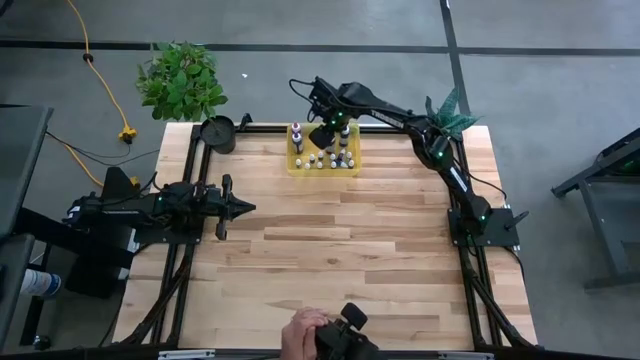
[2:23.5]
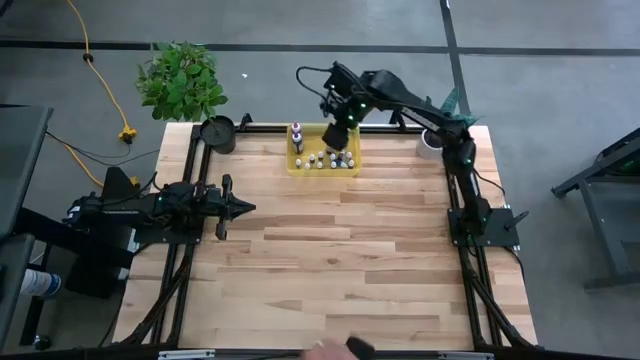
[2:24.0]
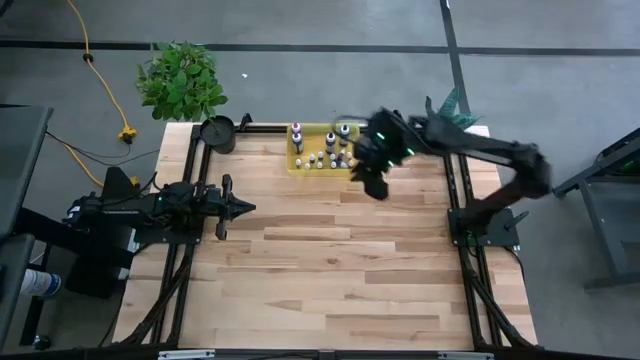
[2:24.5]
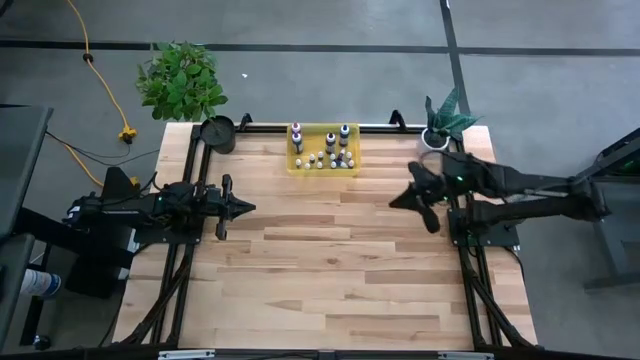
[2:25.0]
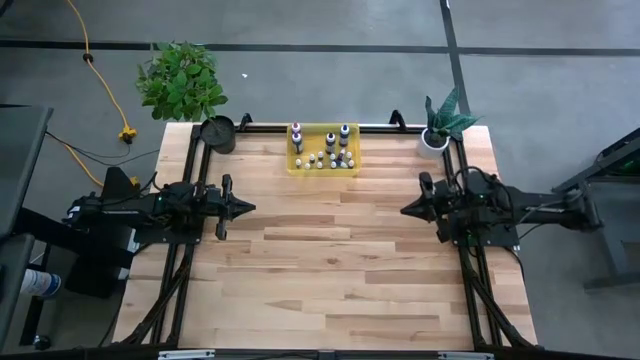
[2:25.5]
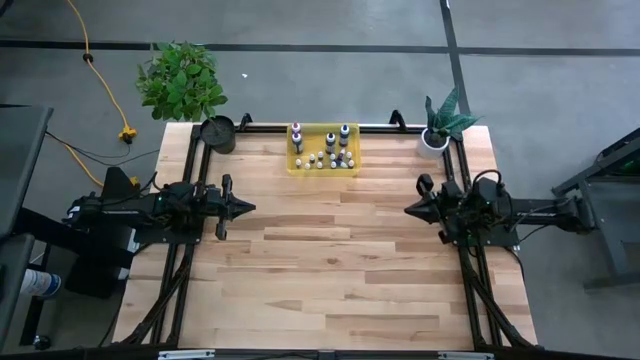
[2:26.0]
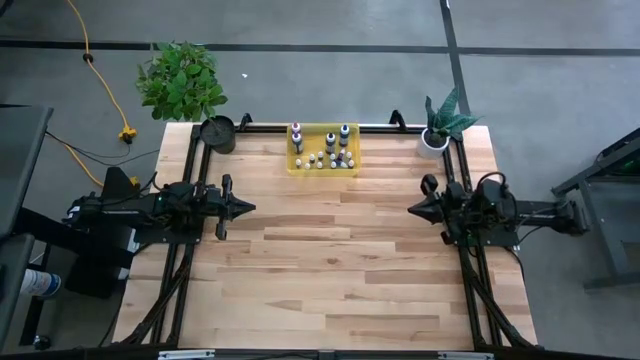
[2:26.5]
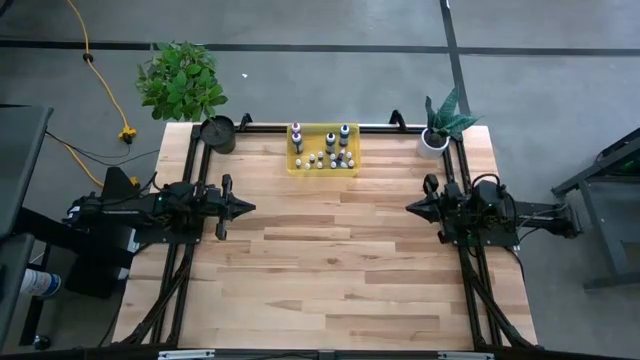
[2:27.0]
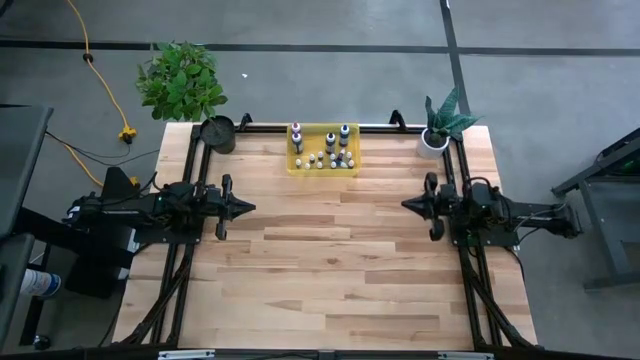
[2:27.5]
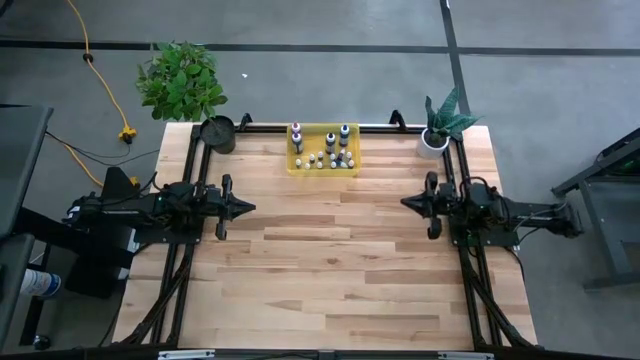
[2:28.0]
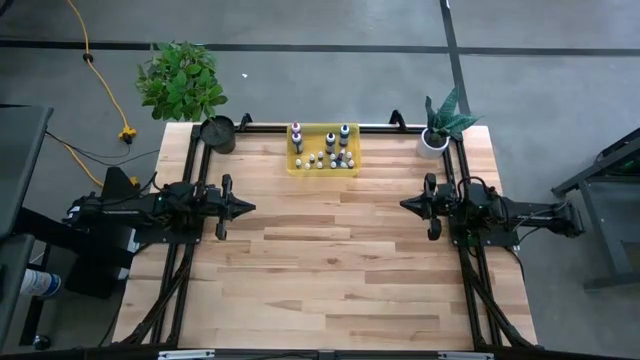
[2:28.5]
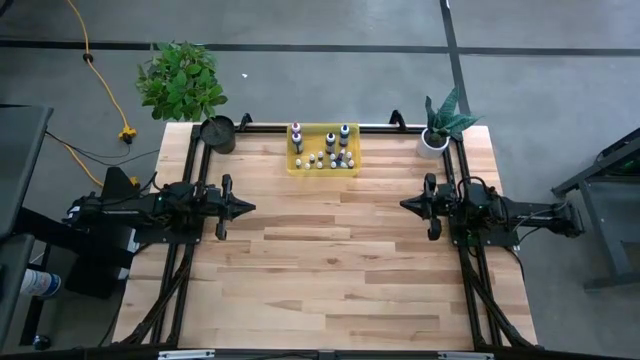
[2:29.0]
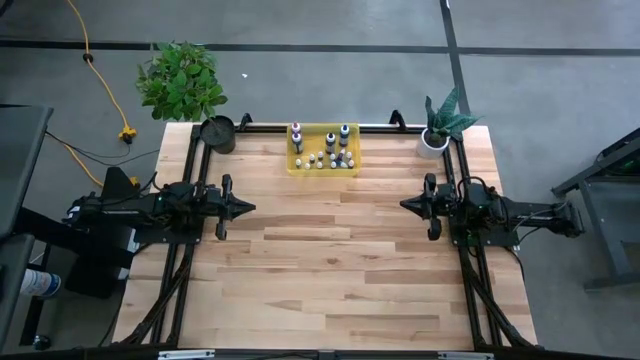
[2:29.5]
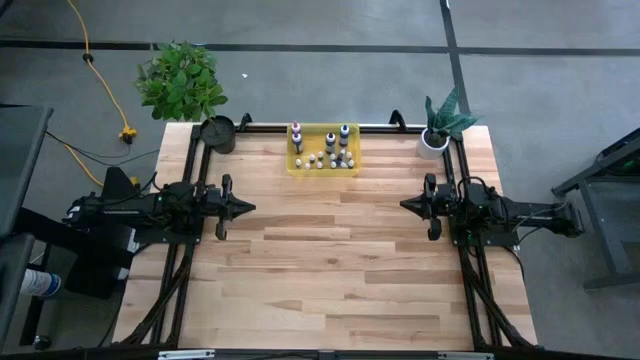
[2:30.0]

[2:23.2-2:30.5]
Task: Pick & Place food coloring
Return to Home Position

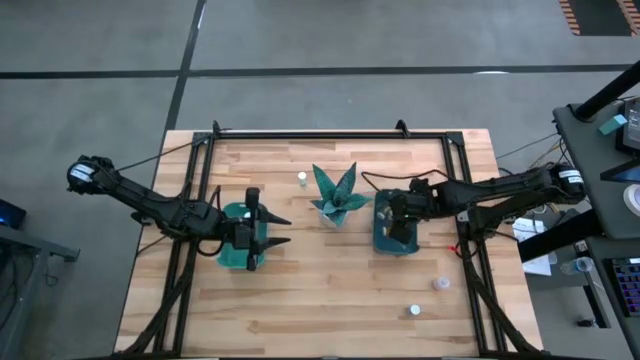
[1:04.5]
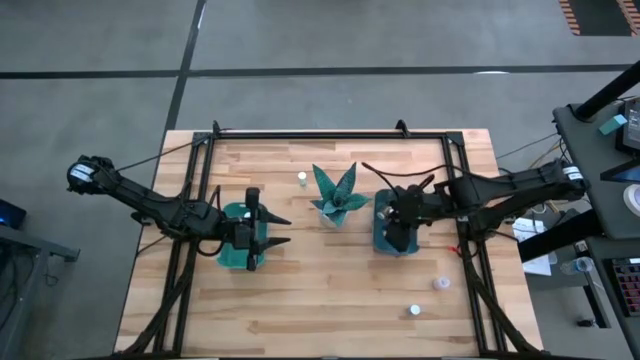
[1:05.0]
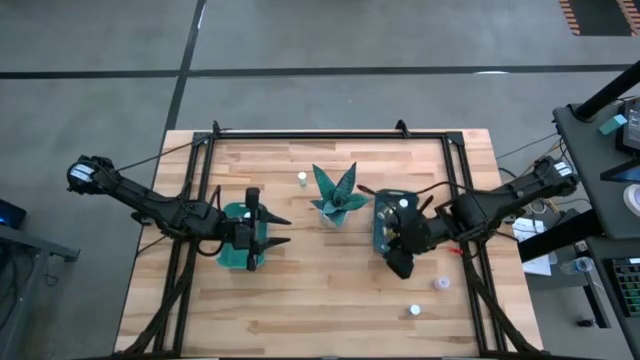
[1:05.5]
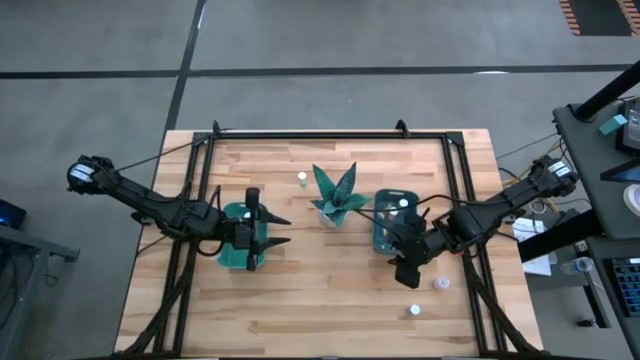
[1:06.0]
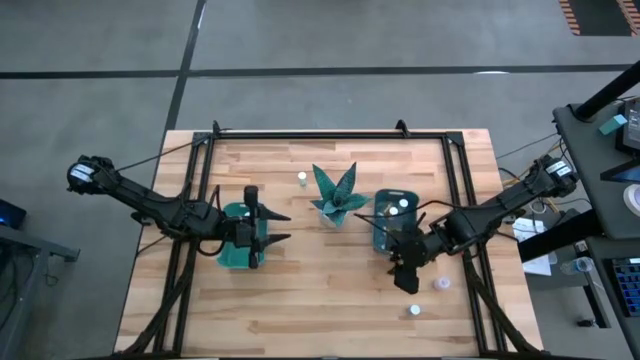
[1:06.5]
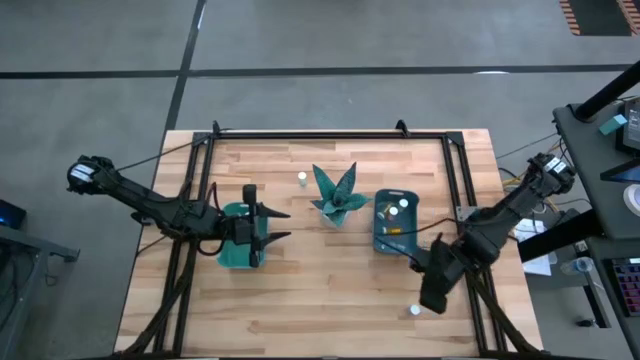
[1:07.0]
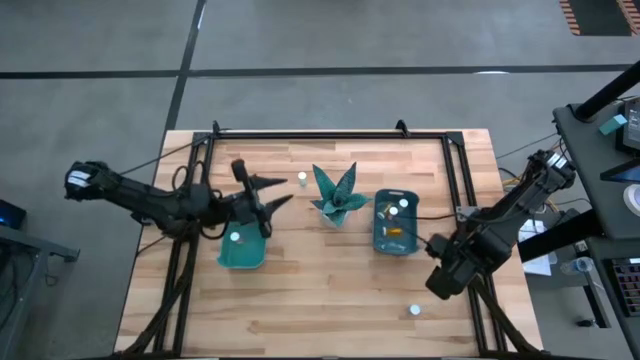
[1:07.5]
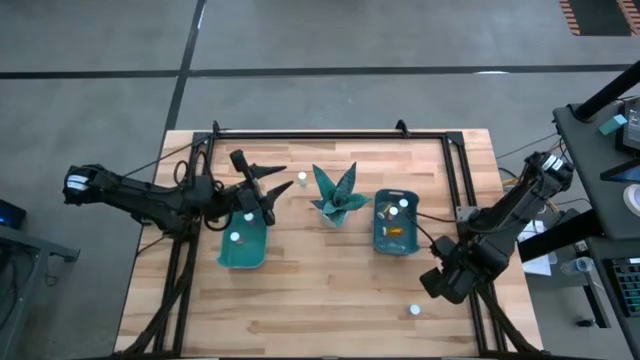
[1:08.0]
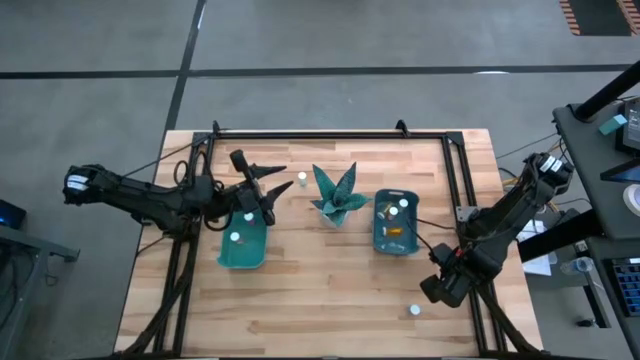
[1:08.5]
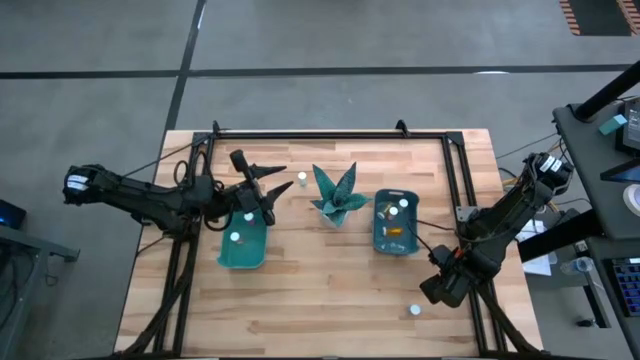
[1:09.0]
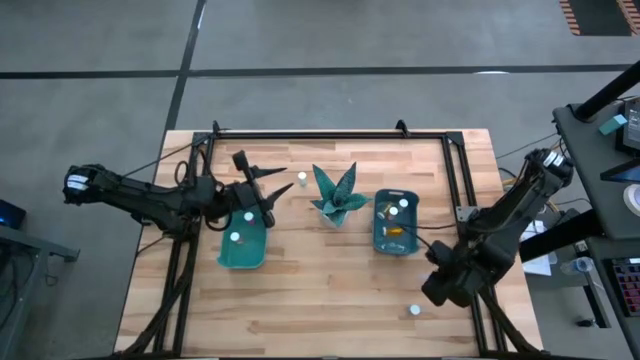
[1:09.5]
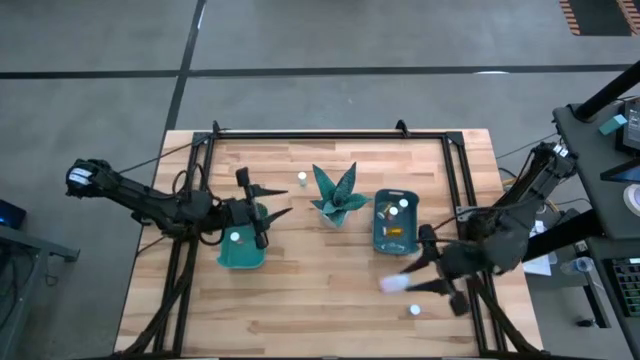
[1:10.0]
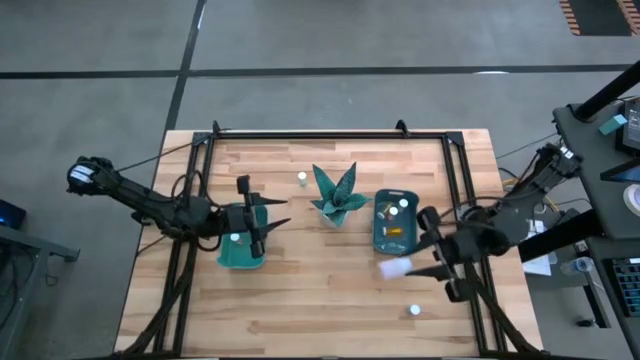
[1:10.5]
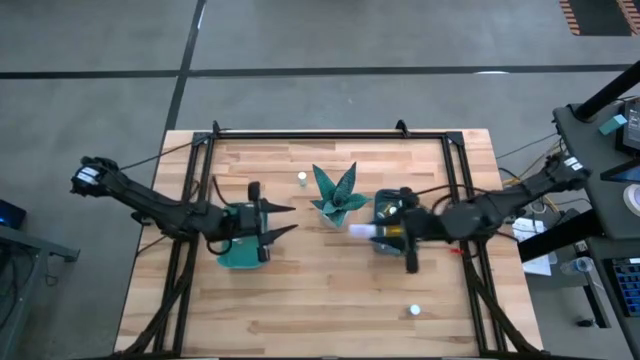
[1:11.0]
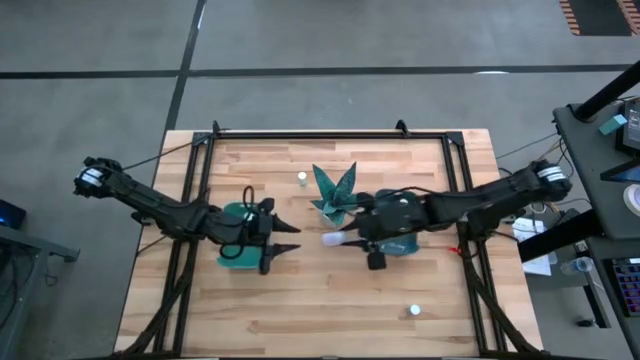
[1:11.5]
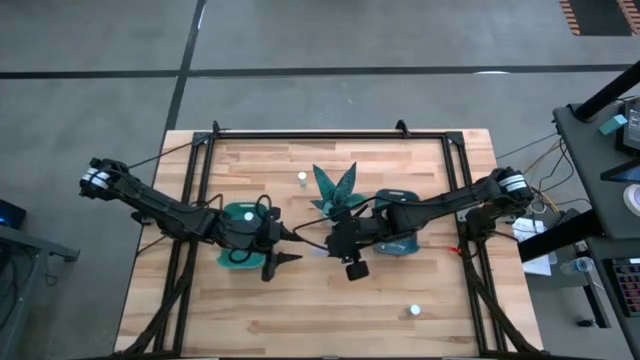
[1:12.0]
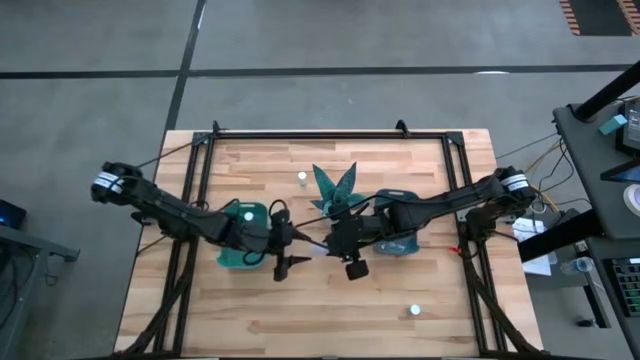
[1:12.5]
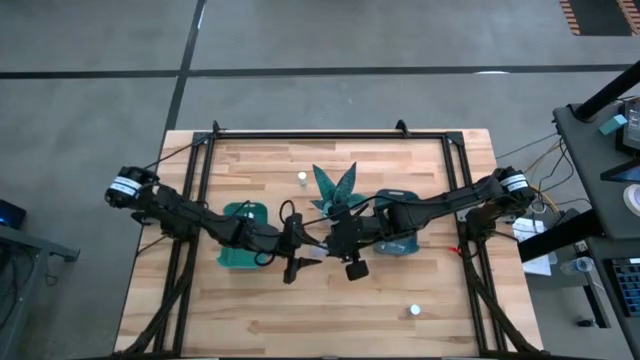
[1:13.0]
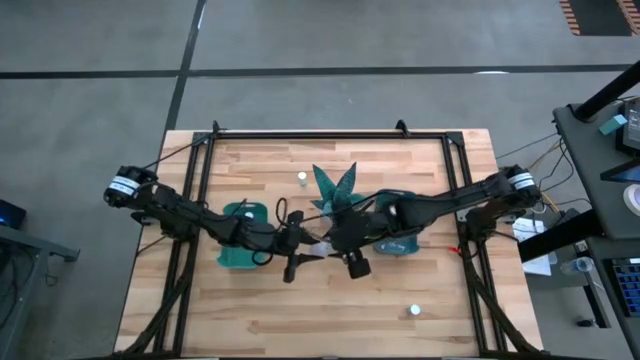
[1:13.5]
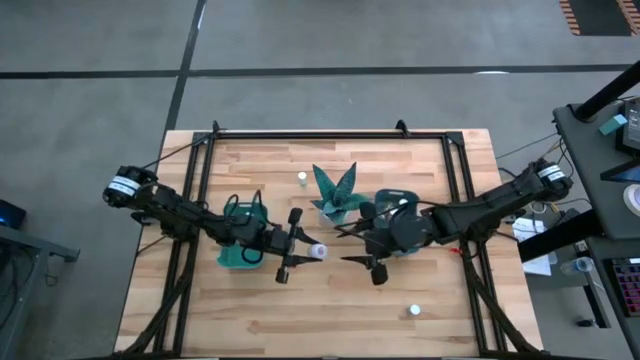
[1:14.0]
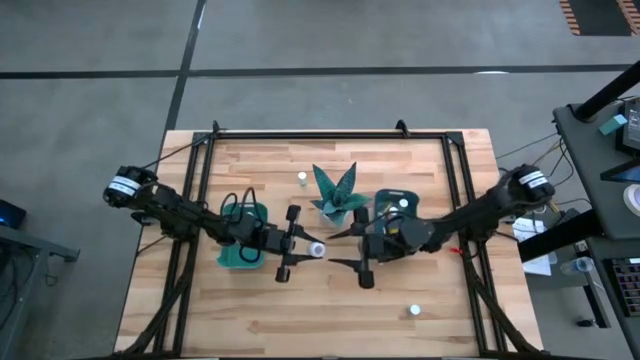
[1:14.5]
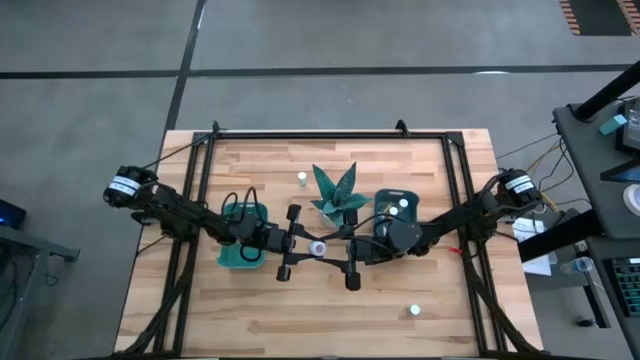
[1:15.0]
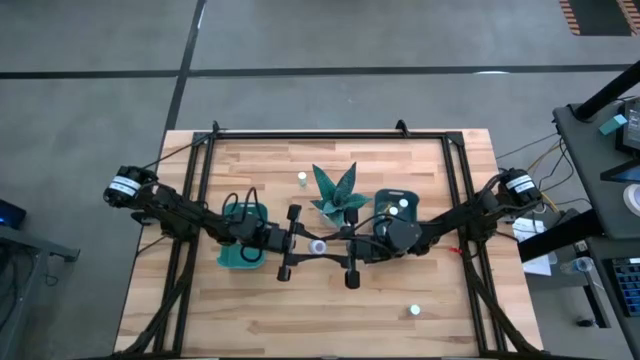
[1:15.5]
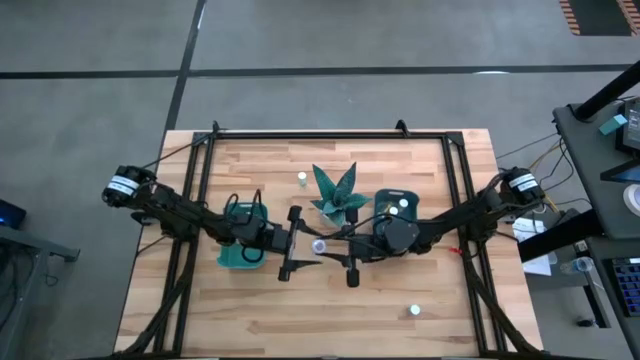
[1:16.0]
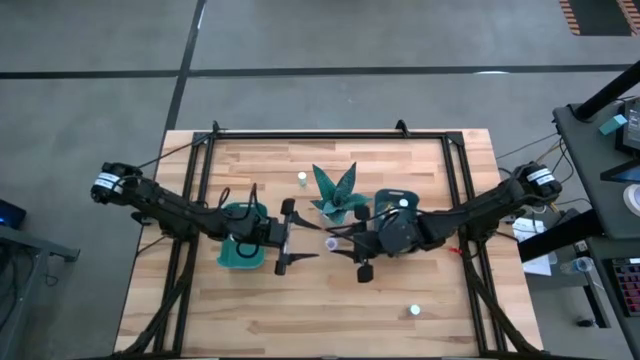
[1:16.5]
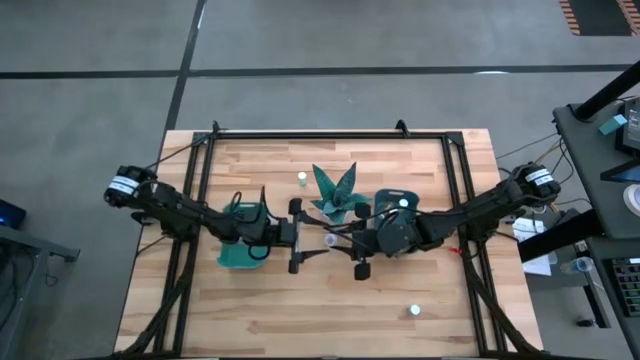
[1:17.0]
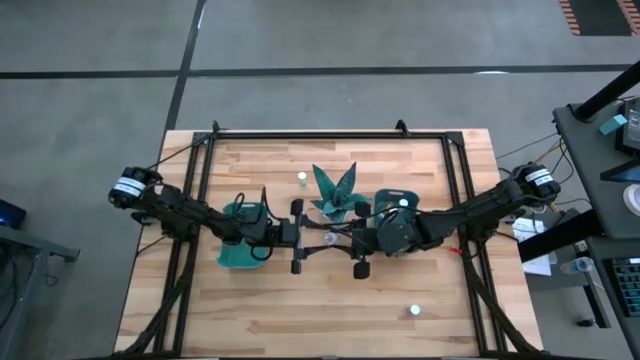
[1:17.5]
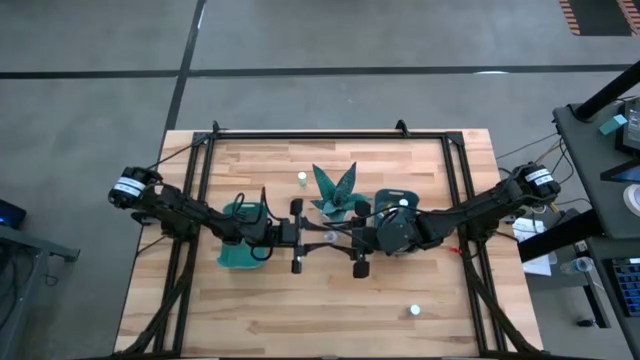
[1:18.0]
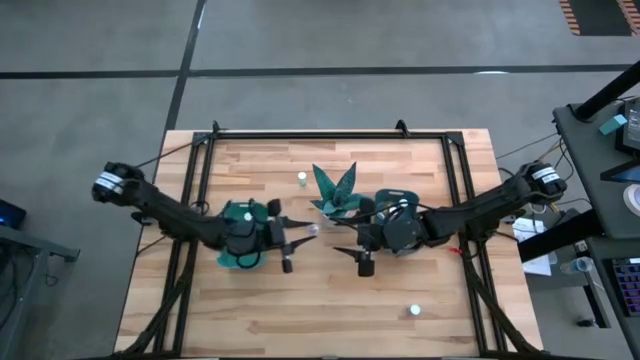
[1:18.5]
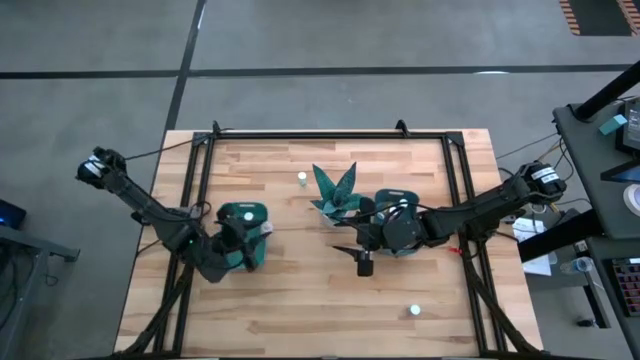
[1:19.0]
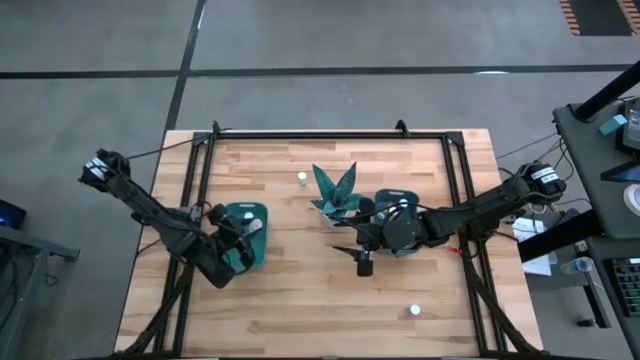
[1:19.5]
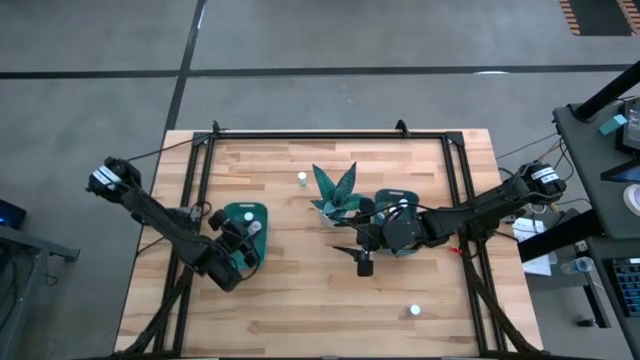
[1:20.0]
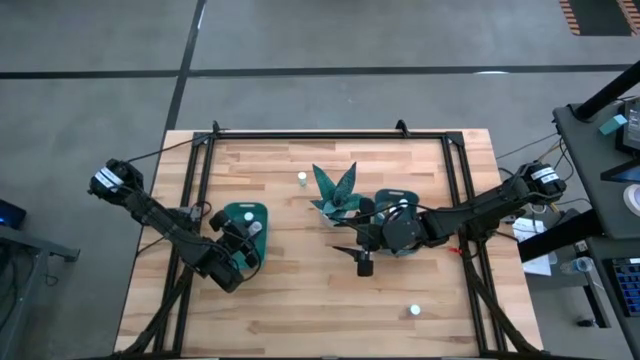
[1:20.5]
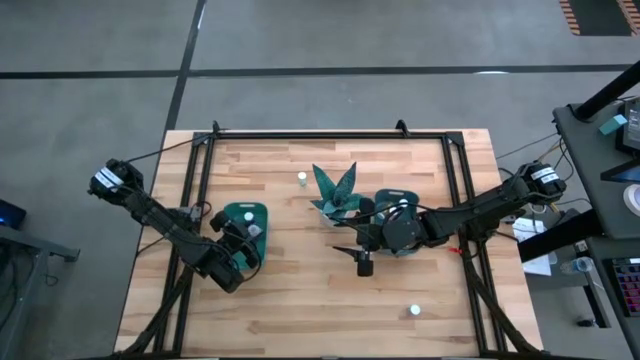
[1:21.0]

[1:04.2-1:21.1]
Task: Pick and place medicine bottles into bin by pill shape (circle, oval)
Put the white capsule bottle into the green bin
